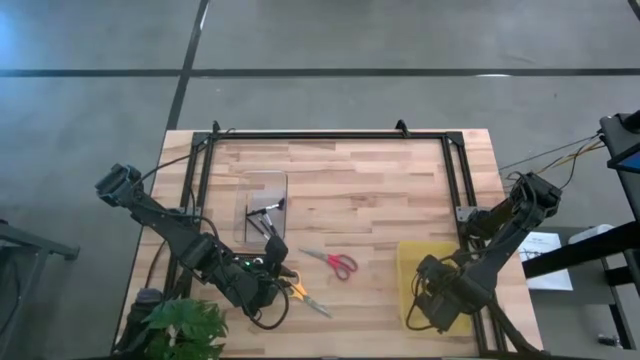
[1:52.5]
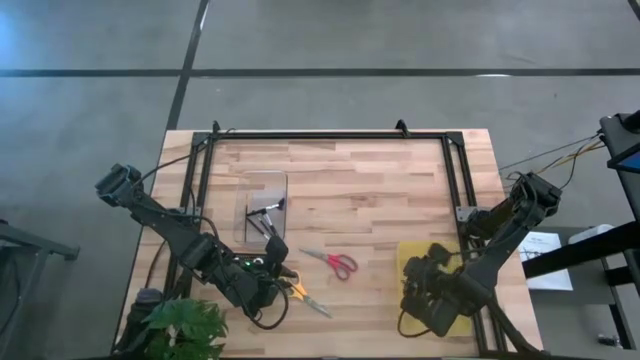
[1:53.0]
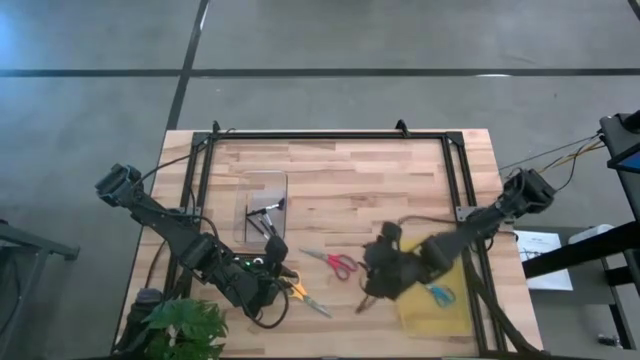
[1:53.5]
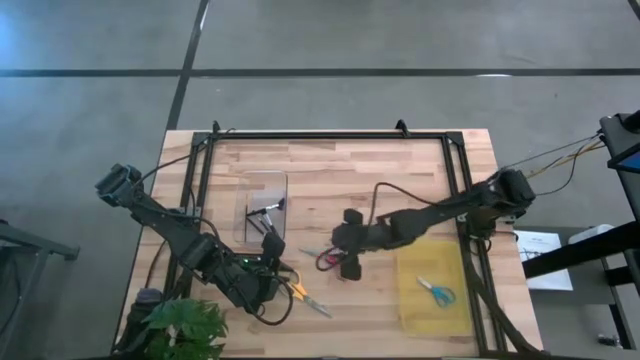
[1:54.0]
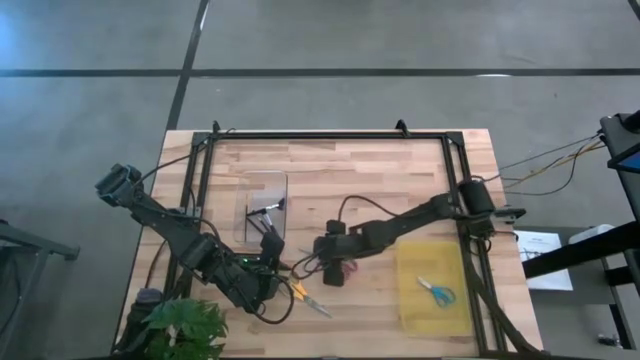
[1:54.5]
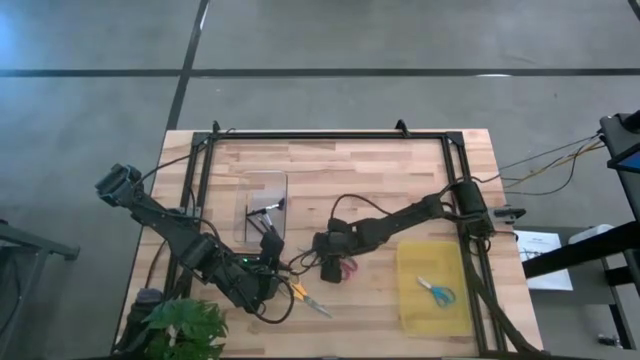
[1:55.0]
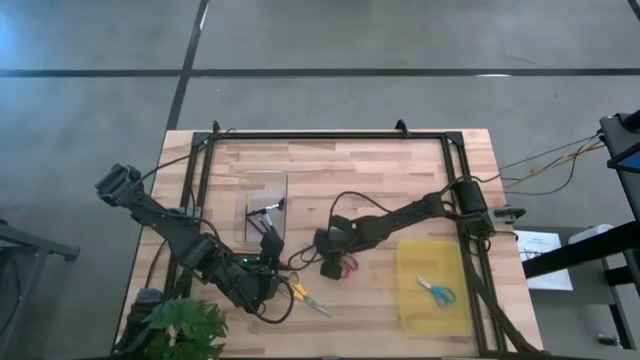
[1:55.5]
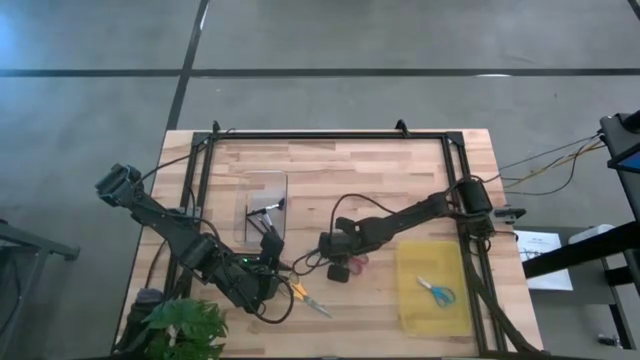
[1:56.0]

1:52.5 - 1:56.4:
Task: Pick & Place Paint Supplies
Put the red scissors into the yellow bin

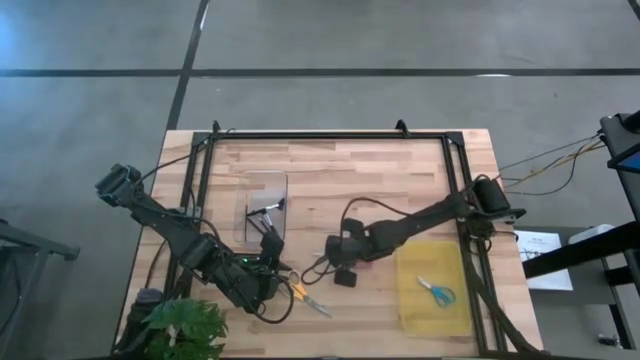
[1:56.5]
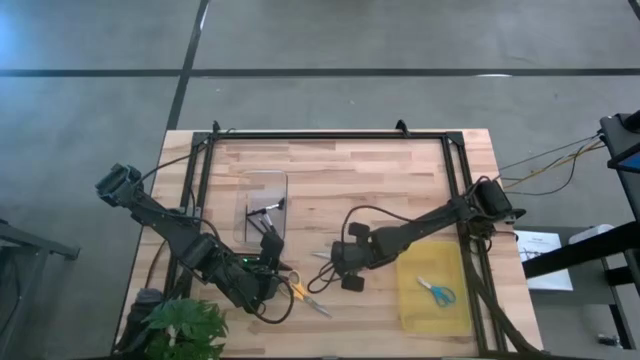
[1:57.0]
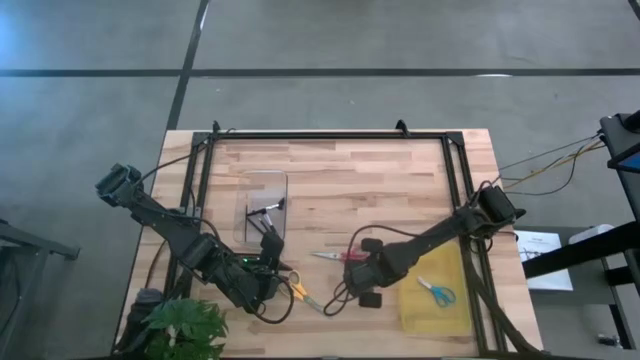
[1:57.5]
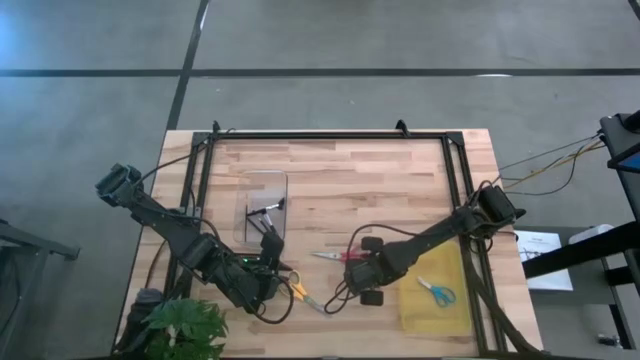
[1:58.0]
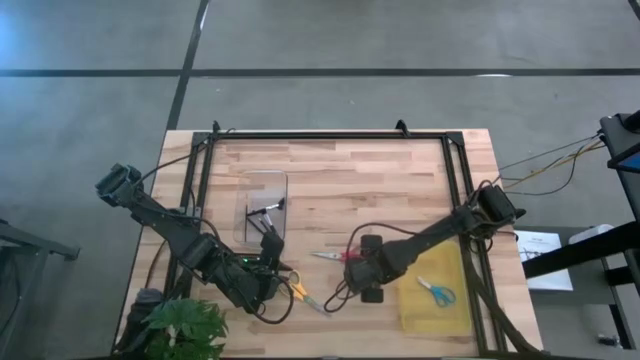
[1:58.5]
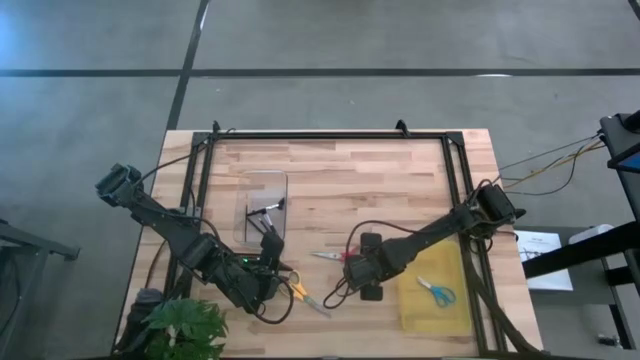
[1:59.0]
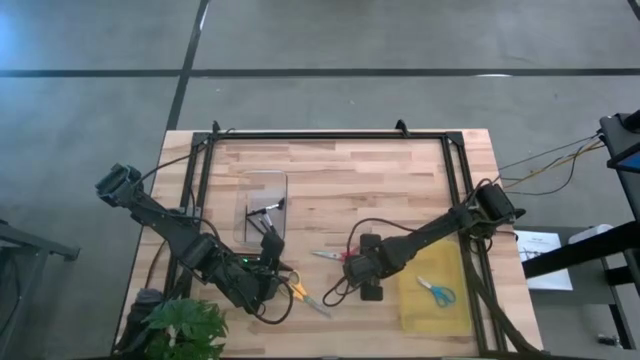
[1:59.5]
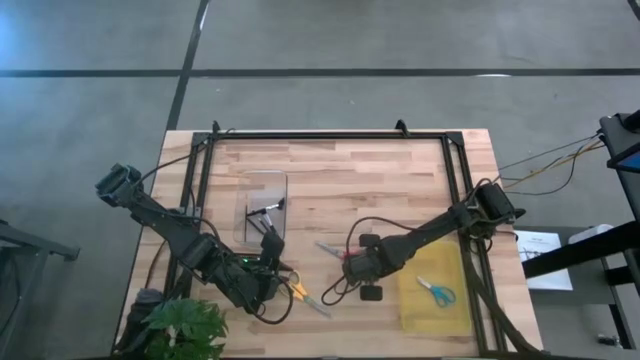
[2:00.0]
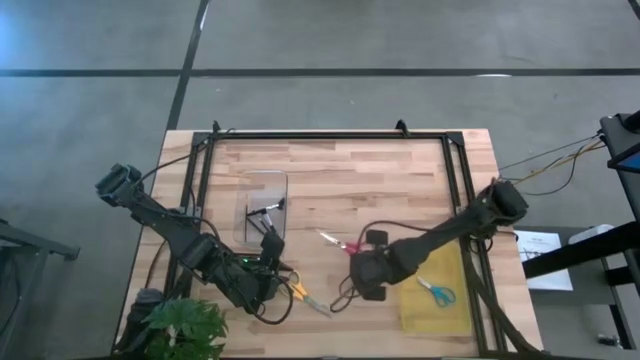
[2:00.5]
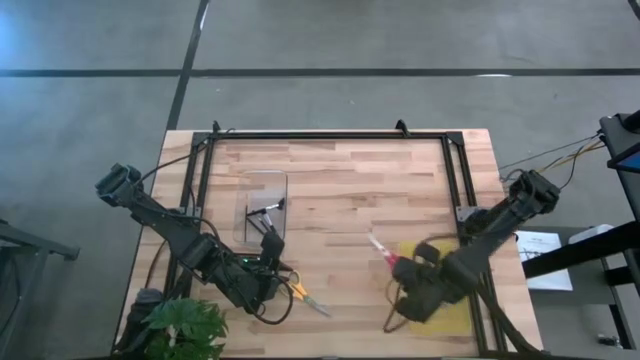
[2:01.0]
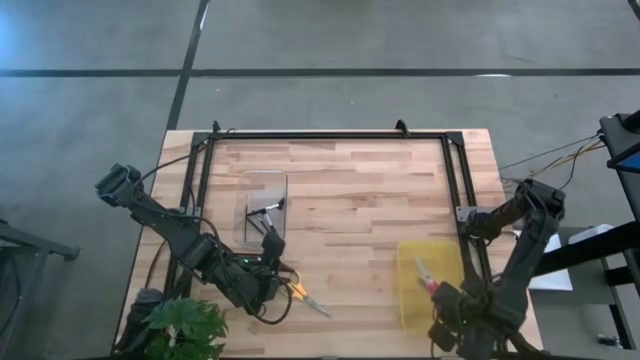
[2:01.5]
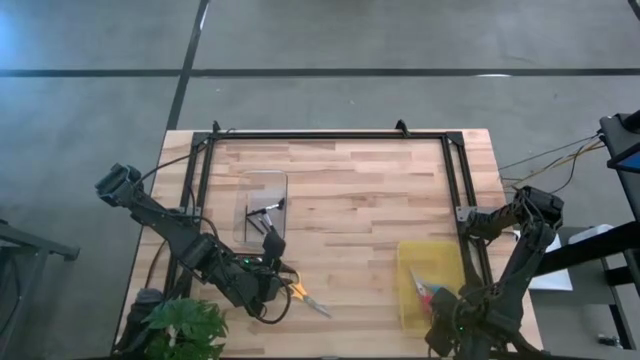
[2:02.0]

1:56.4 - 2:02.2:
Put the red scissors into the yellow bin

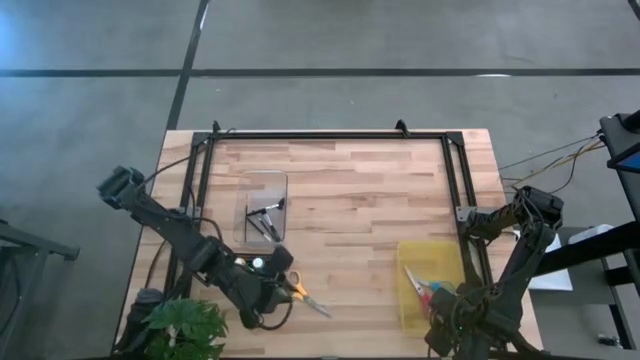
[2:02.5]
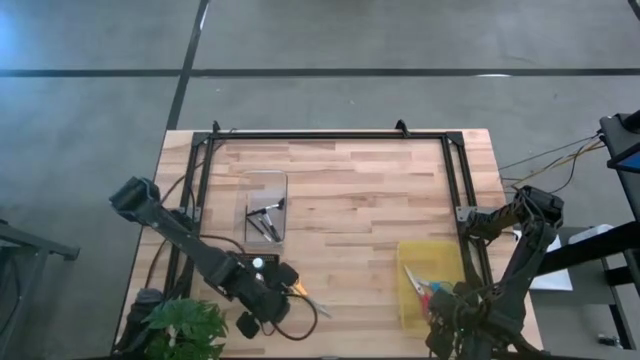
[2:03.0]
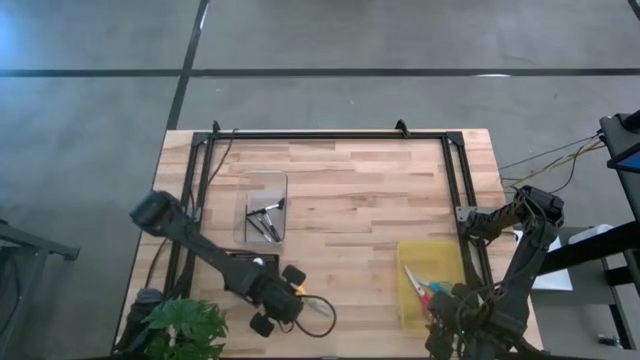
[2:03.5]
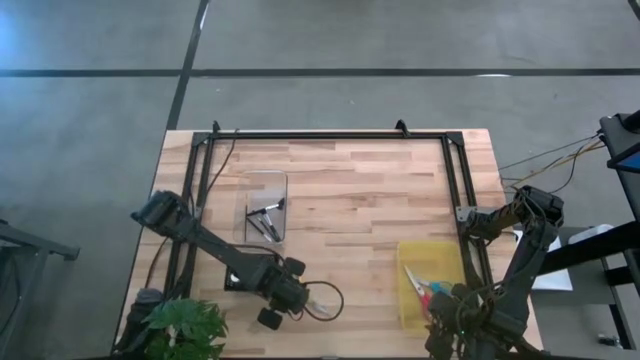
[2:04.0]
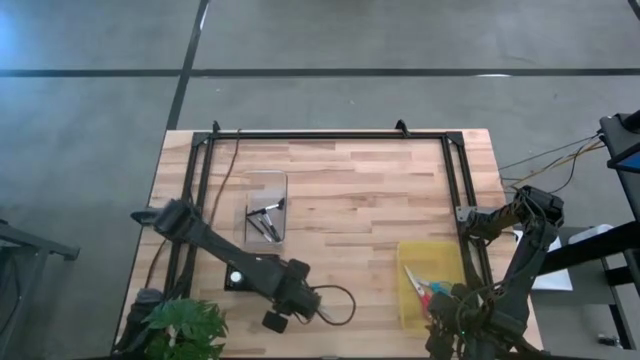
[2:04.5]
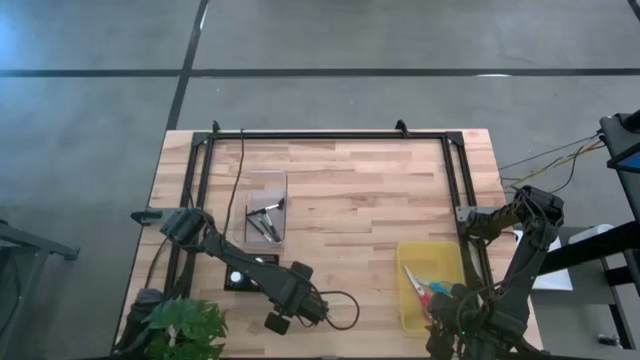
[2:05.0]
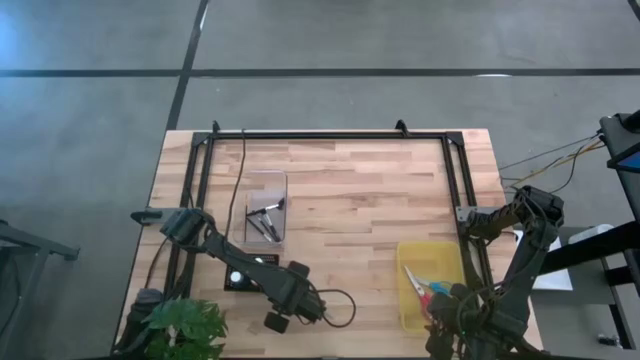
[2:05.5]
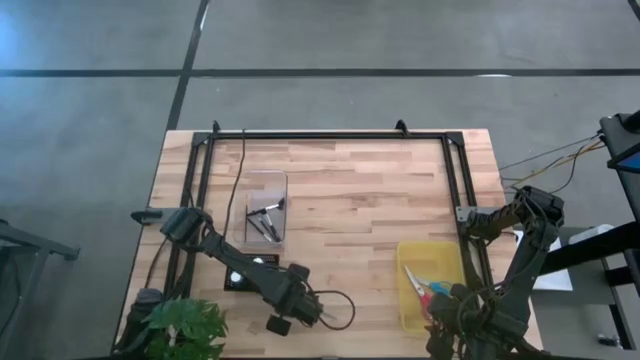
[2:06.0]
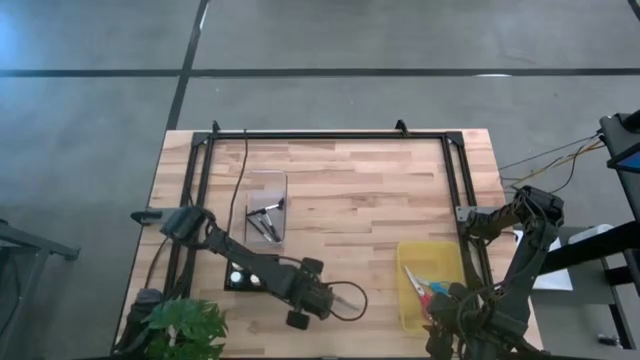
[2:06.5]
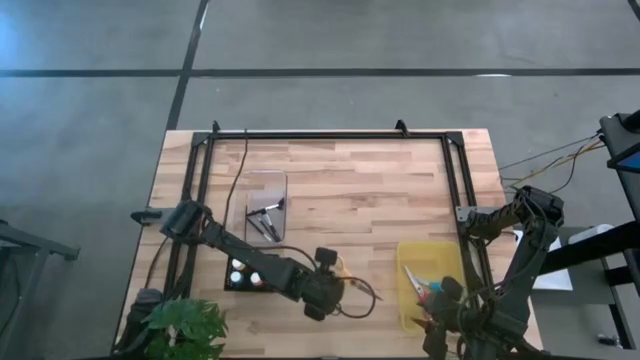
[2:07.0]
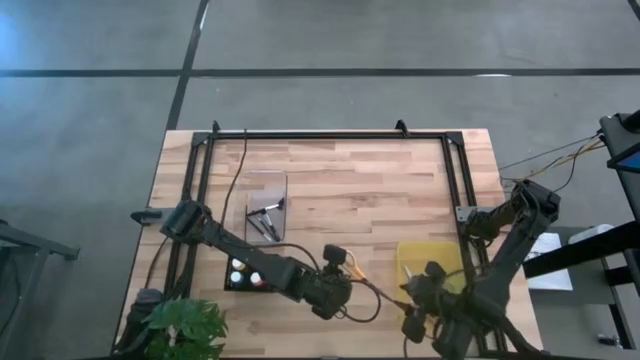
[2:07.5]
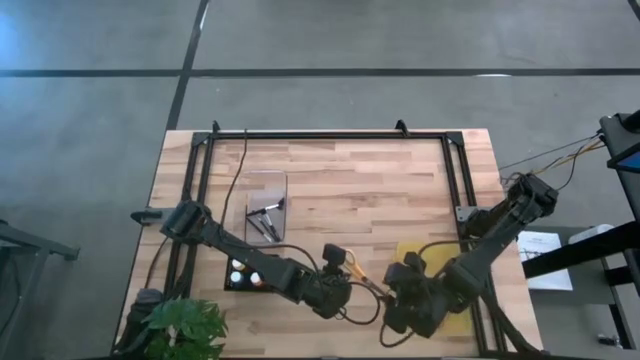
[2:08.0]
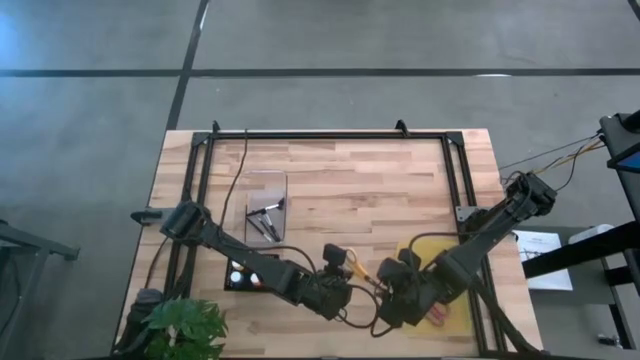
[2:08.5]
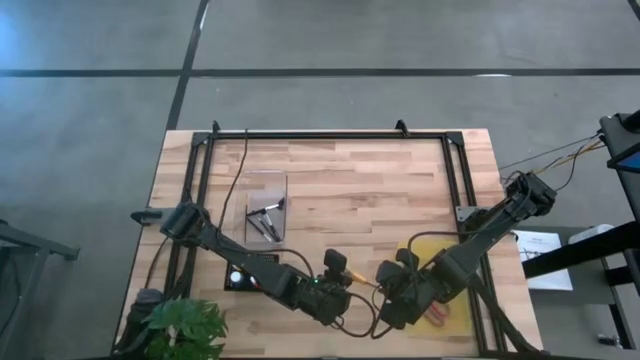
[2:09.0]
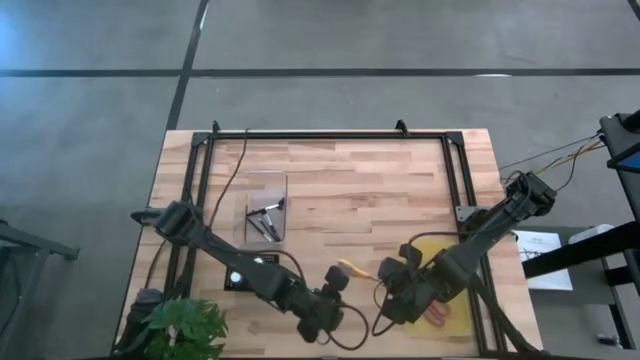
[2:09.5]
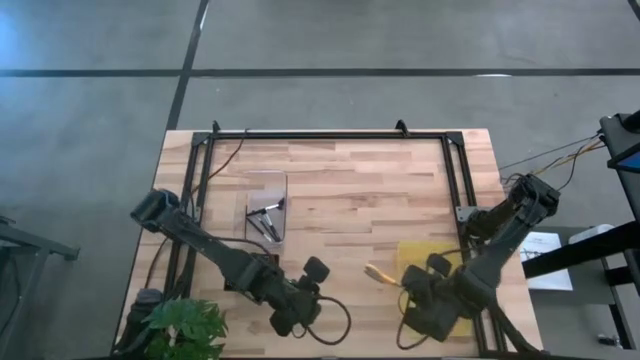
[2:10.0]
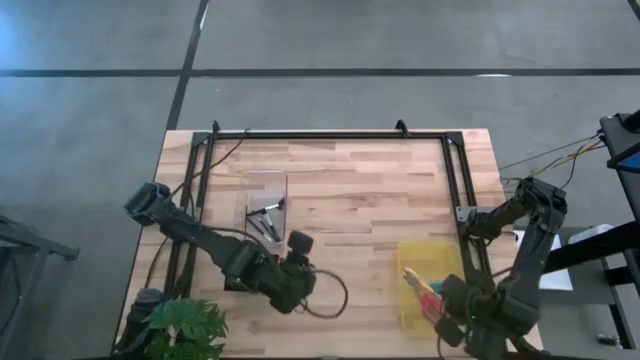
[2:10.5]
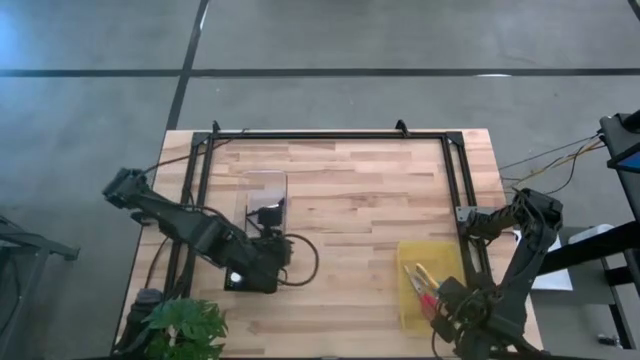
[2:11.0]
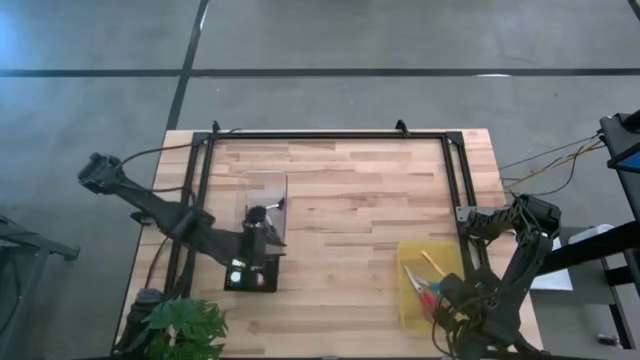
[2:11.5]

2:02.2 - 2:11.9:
Put the yellow scissors into the yellow bin

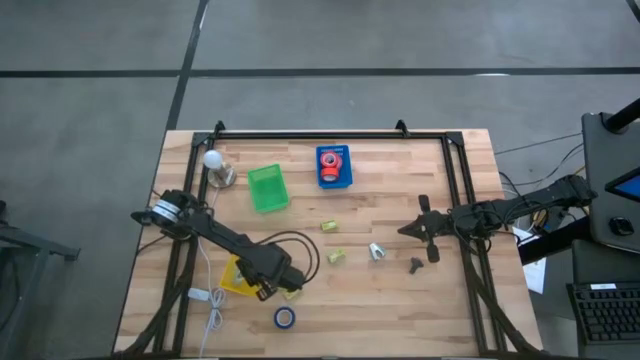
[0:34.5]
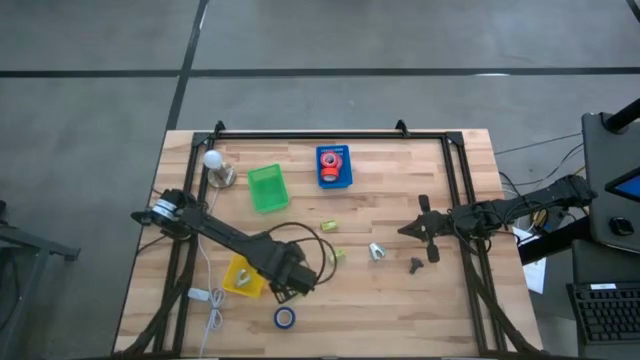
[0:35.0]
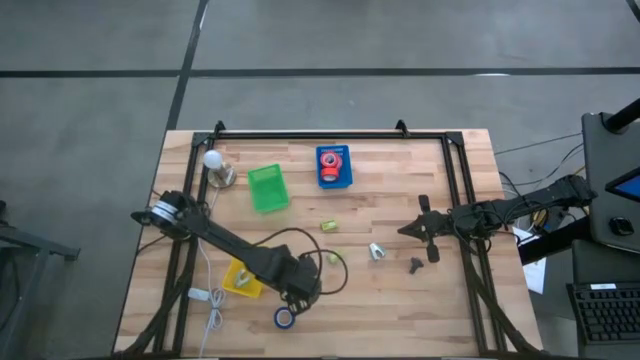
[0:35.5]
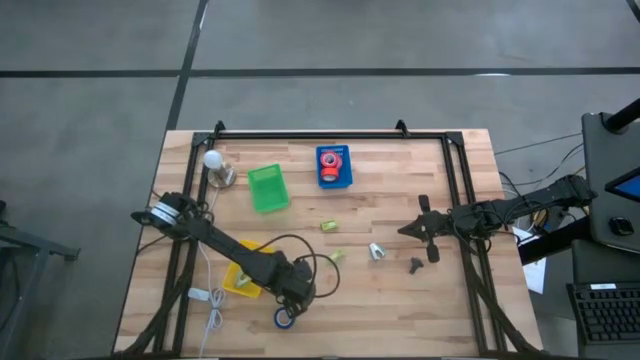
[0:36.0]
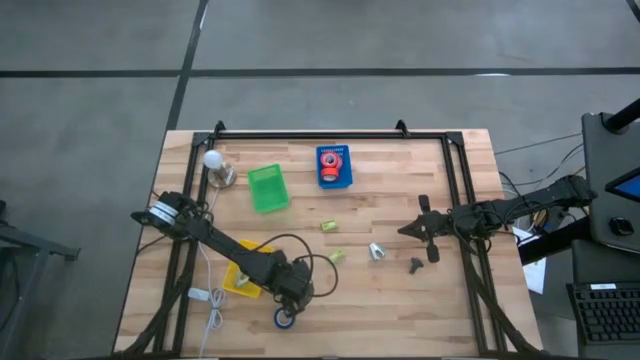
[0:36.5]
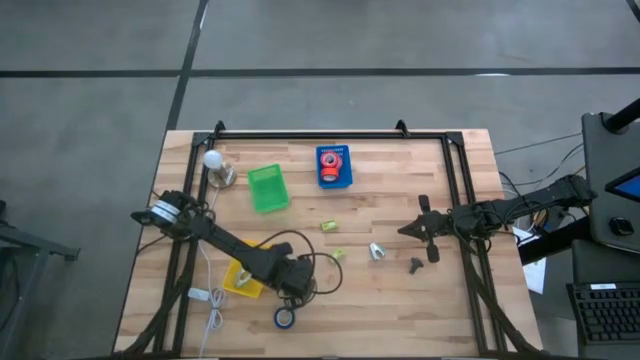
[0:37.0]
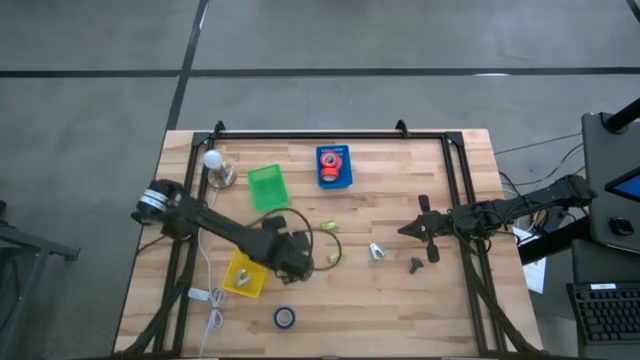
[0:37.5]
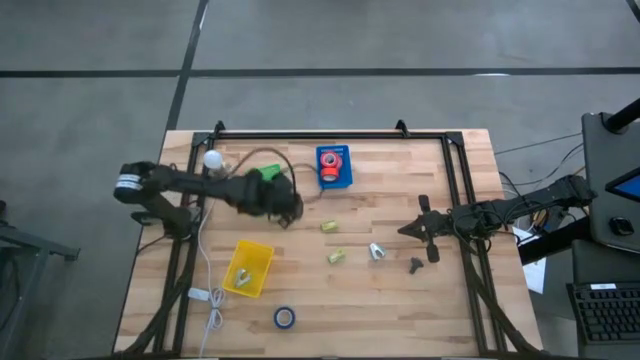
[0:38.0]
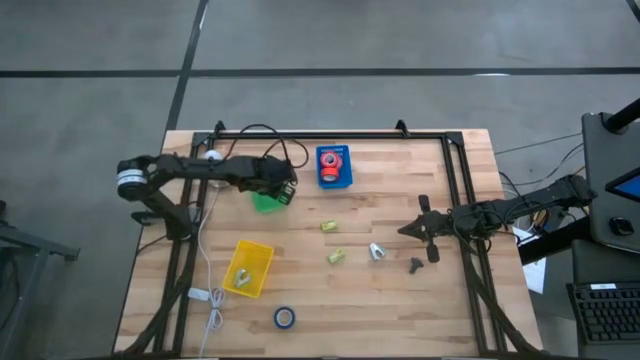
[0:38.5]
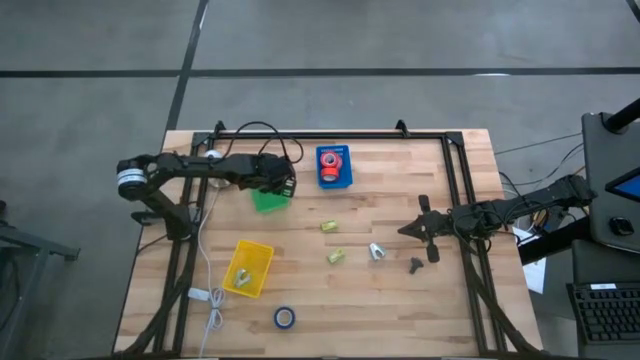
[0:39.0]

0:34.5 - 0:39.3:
Task: Pick and place Stapler, Stapler remover, tape
Put the bottom green staple wire box into the green bin
